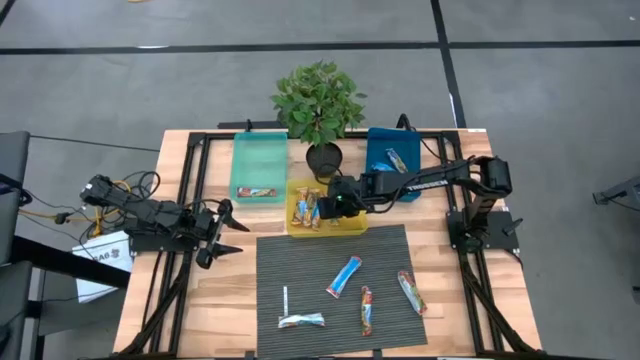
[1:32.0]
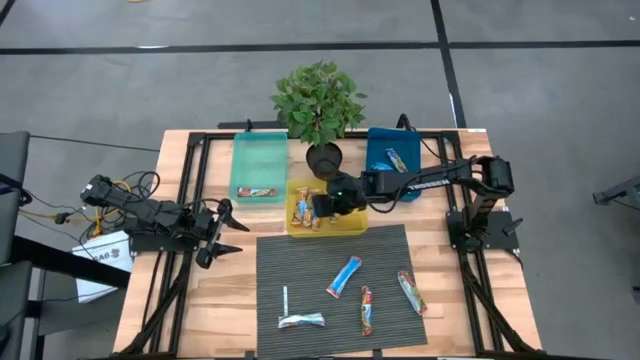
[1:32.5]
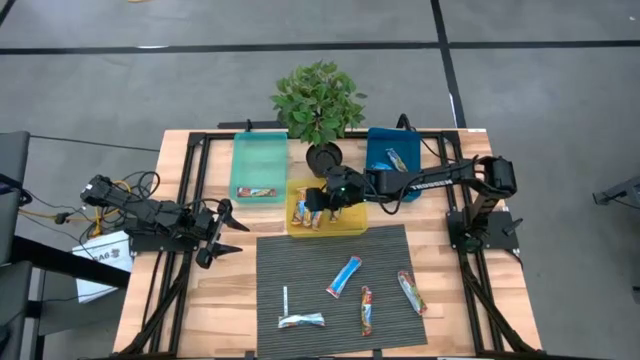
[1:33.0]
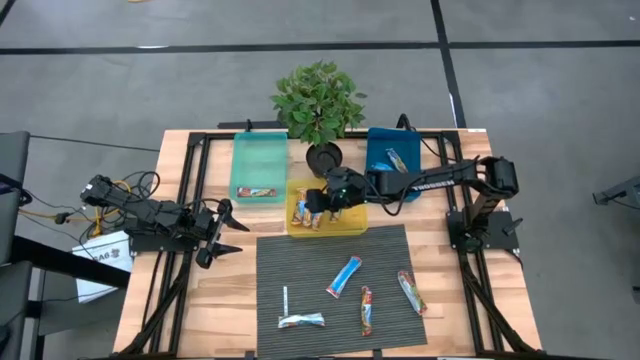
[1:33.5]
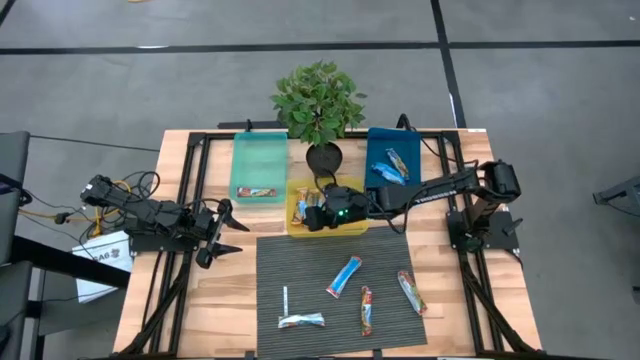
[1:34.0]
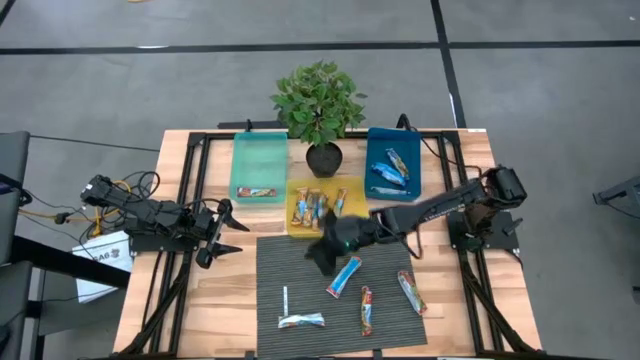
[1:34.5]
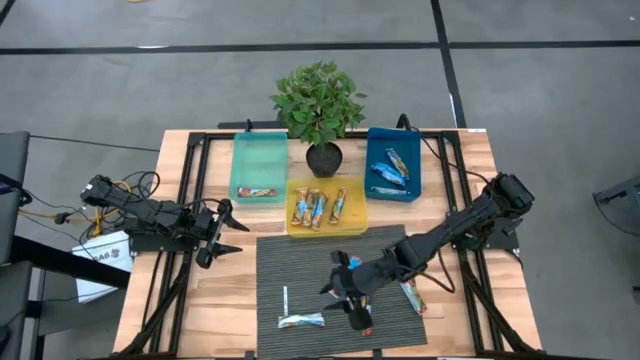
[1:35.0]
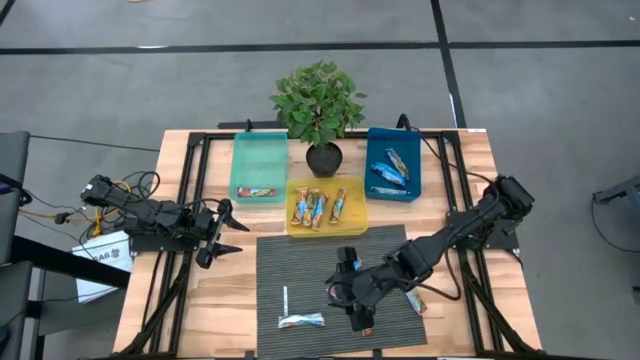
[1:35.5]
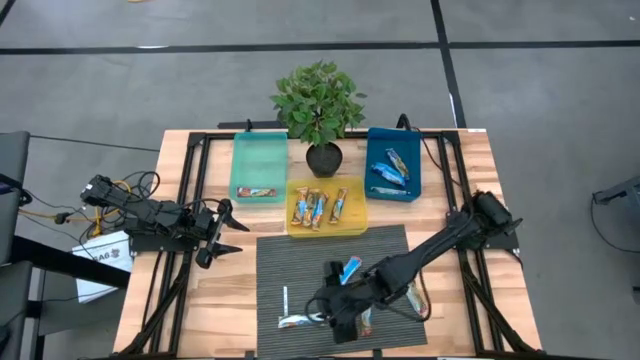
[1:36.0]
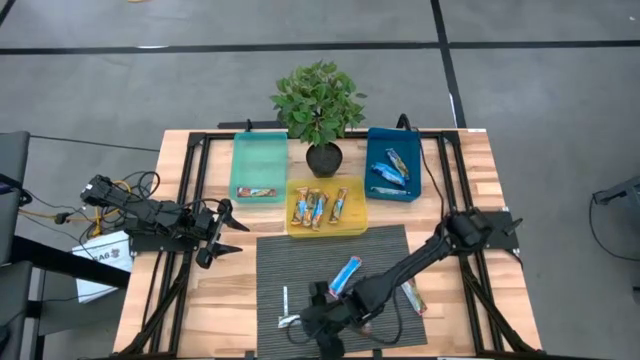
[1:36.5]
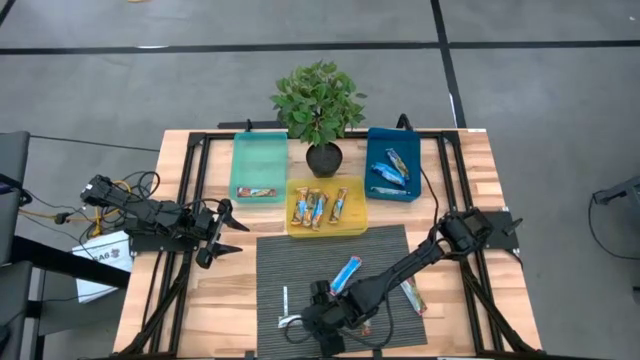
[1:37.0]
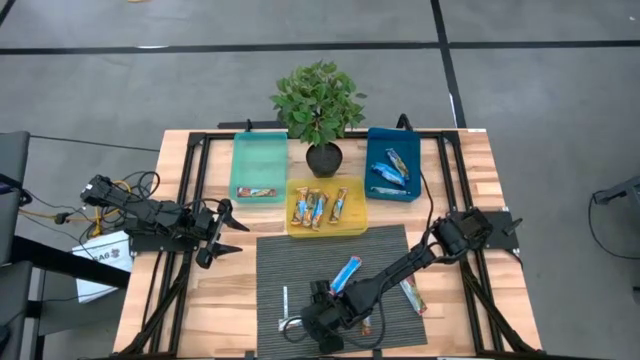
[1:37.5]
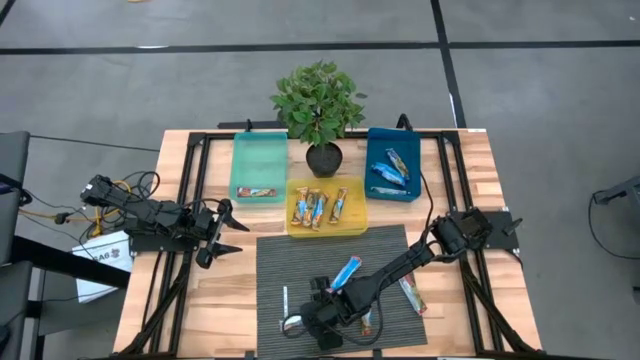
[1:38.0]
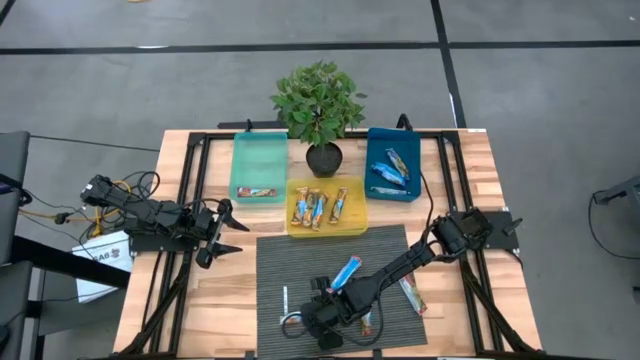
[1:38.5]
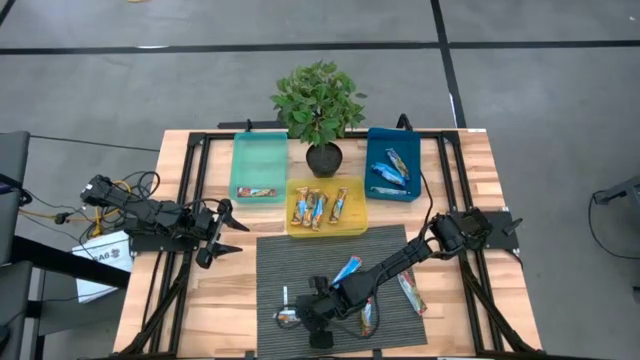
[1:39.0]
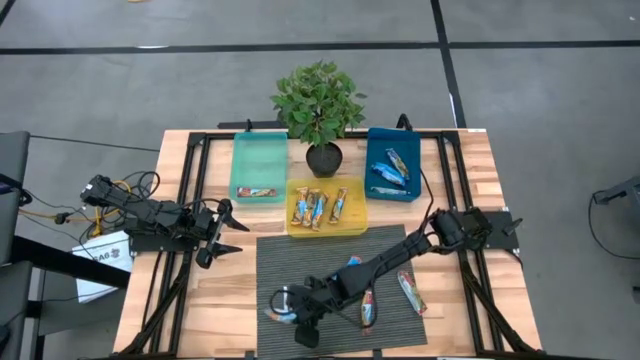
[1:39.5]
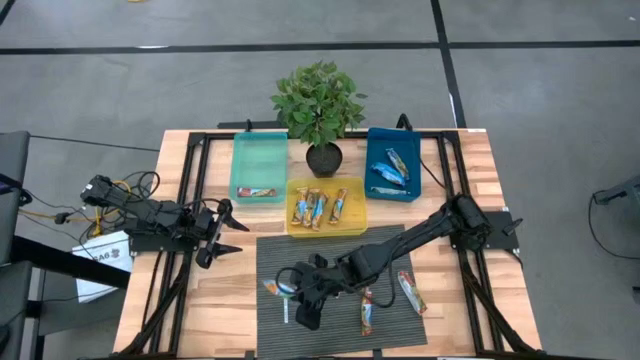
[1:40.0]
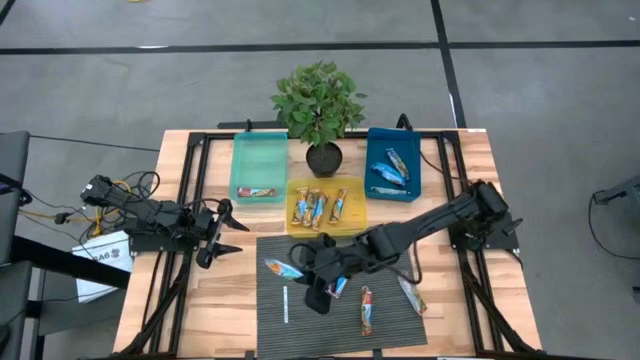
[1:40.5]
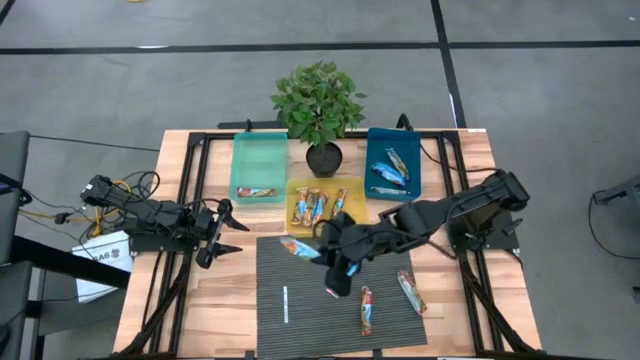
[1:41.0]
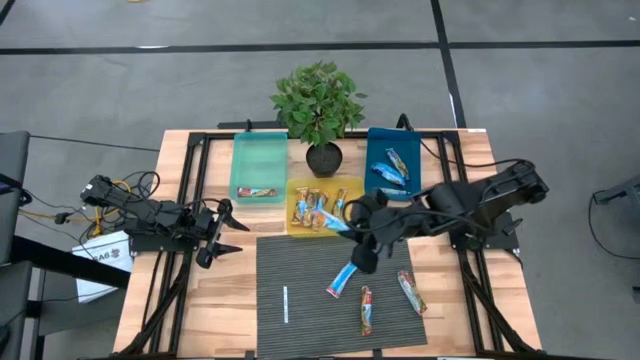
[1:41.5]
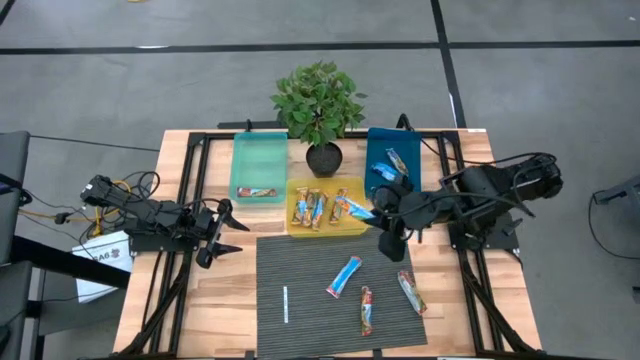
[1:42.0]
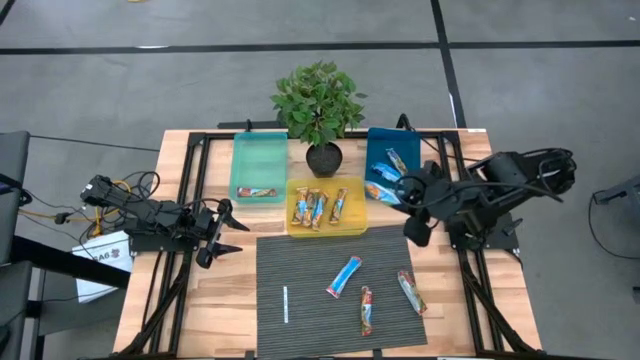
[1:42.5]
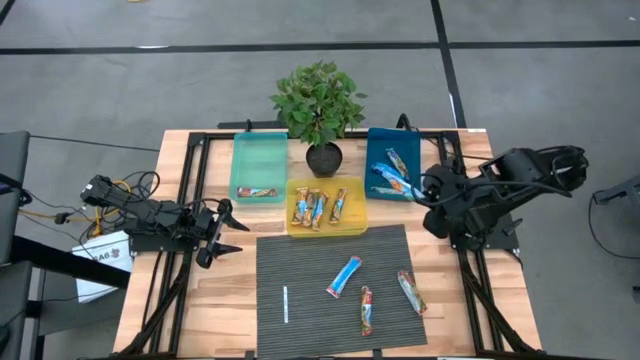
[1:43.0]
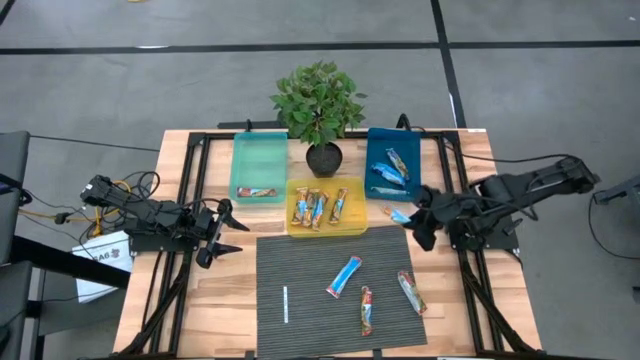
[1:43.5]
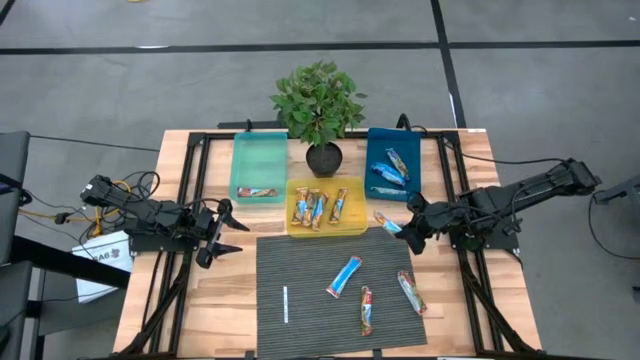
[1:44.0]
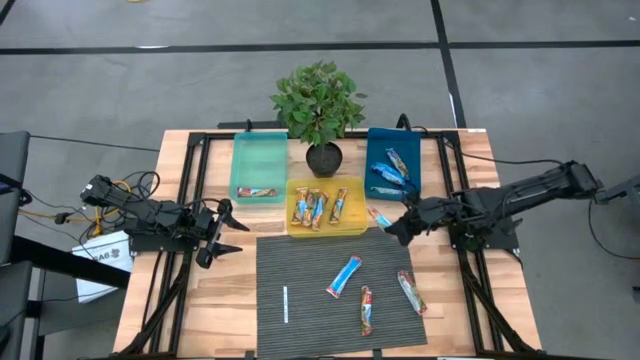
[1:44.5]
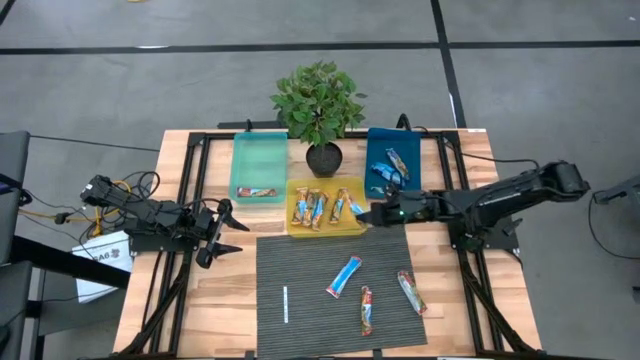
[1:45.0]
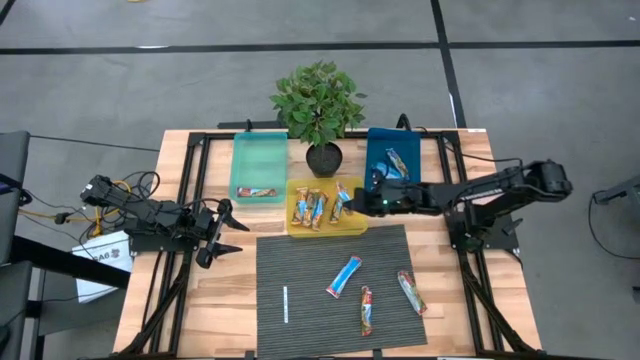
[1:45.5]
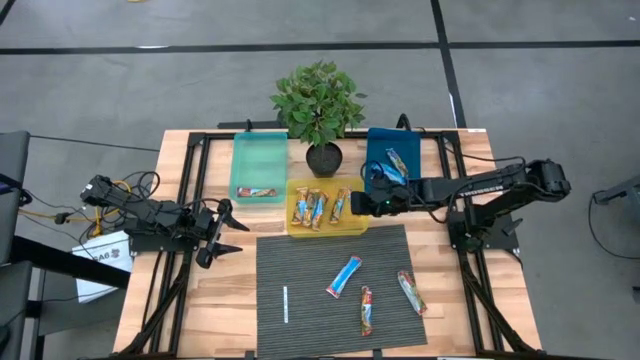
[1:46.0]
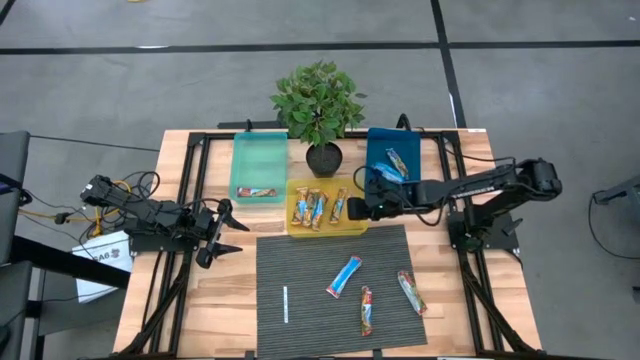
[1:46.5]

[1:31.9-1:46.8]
Task: Pick and place Granola Bars by type
Put the orange granola bar into the yellow bin

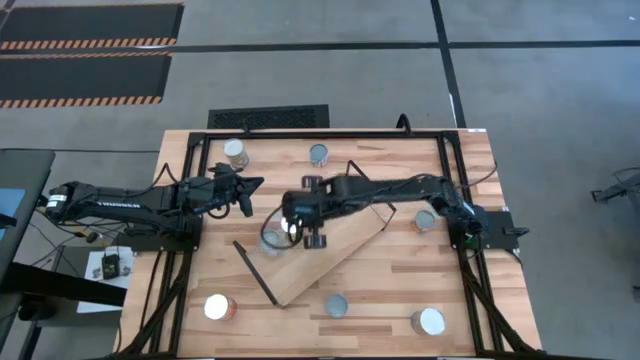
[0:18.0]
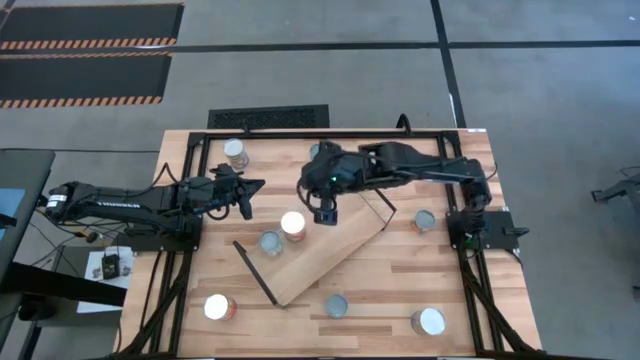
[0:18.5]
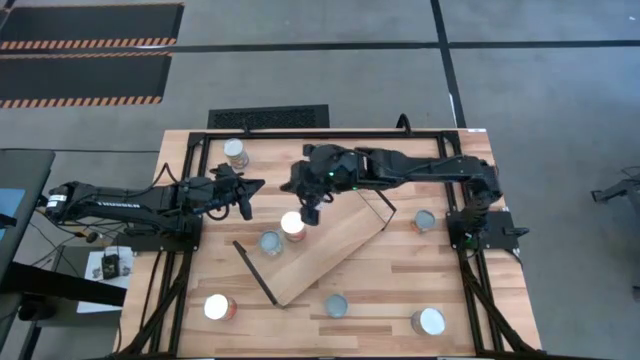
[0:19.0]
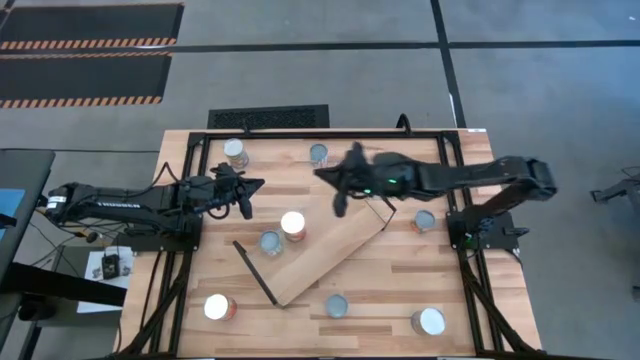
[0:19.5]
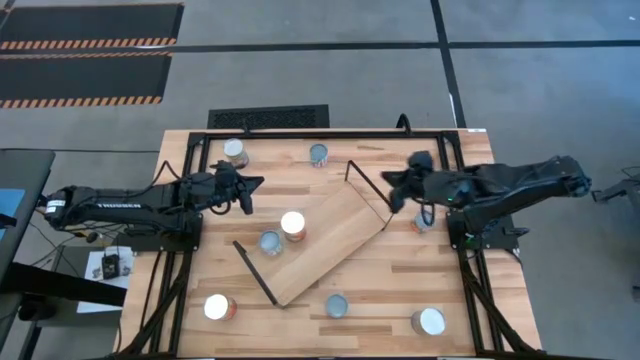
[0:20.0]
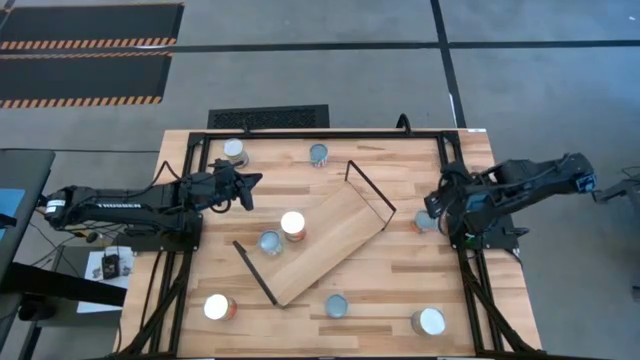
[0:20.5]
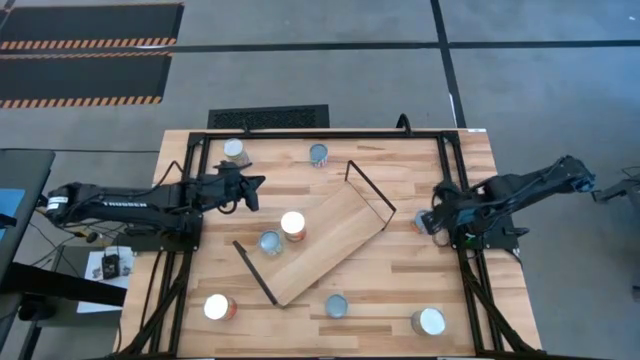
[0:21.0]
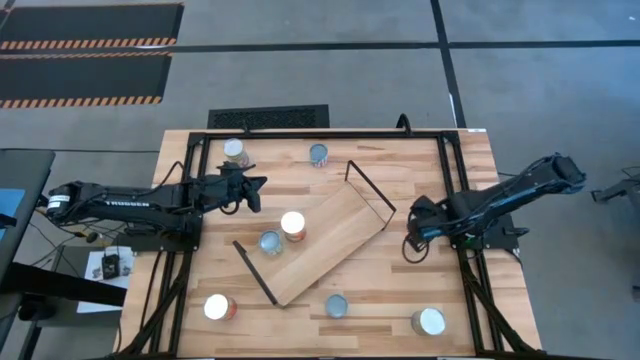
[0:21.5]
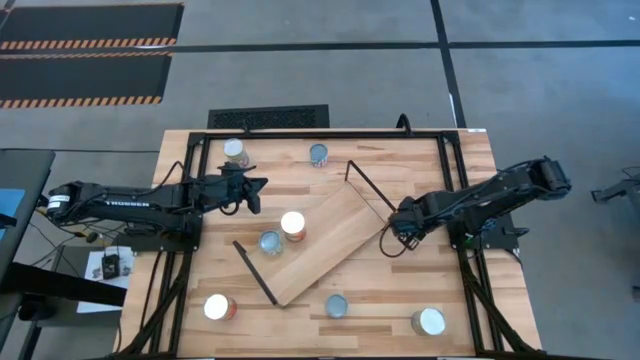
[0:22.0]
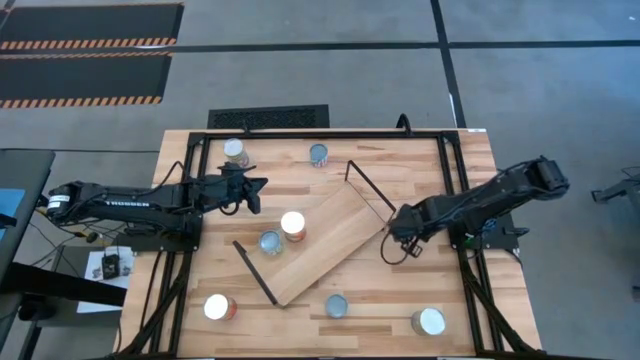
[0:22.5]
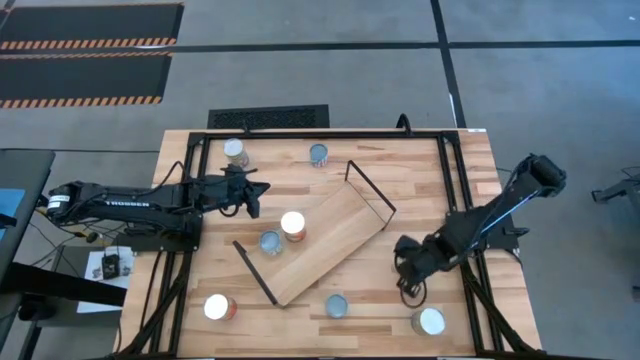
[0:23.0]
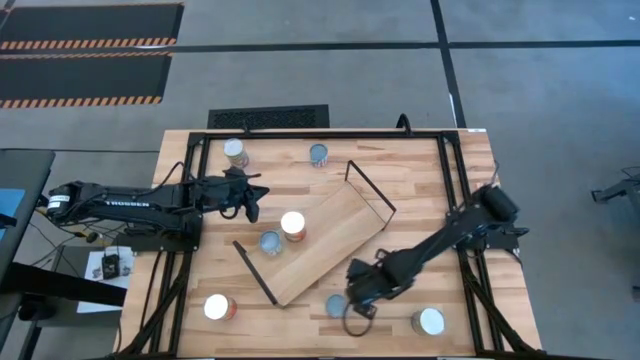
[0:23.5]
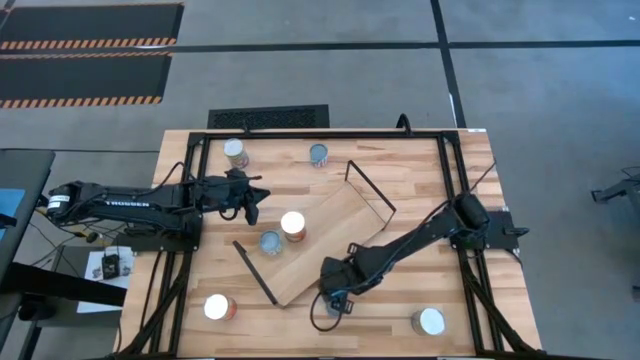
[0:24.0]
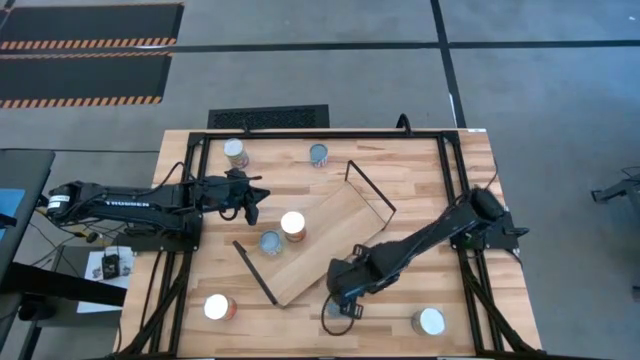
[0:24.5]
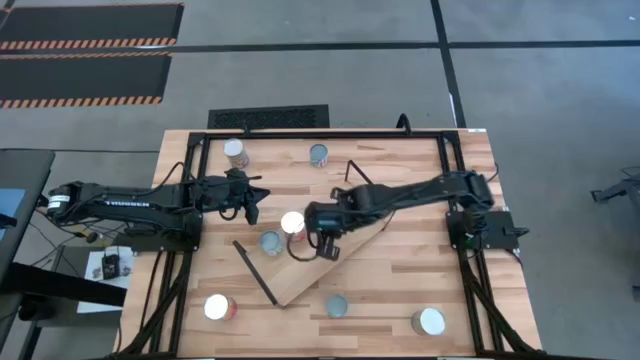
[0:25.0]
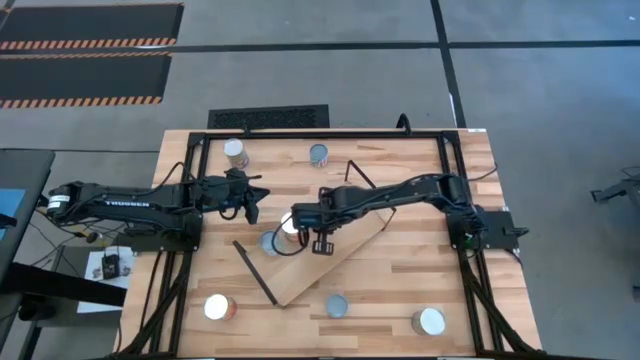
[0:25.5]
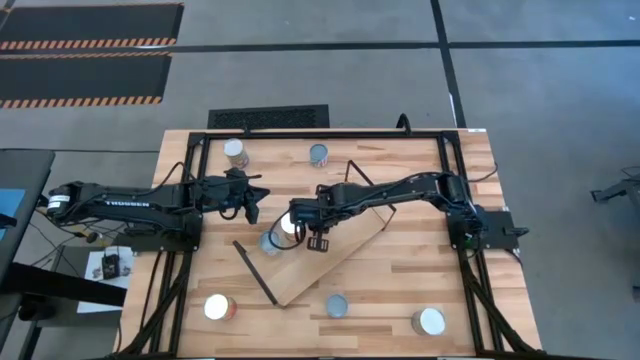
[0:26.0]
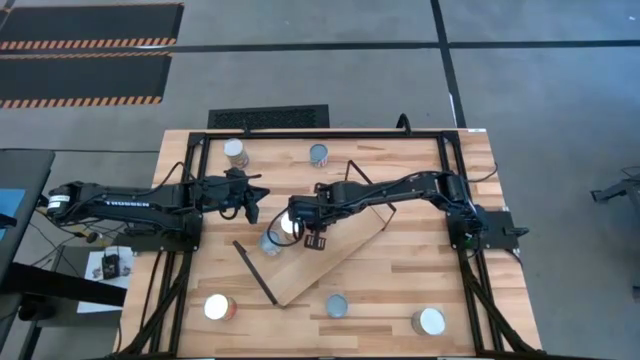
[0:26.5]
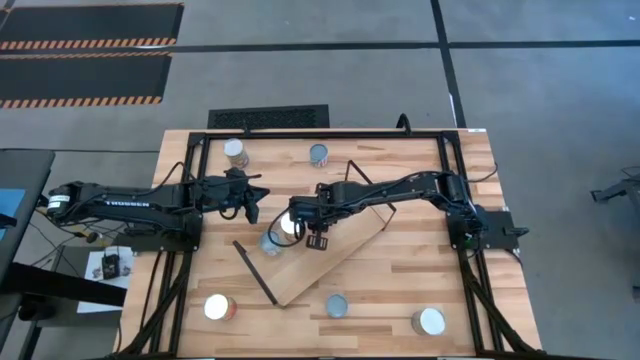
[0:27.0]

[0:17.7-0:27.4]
Task: Pick and place cans onto a shelf
Put the canned oranges on the shelf
